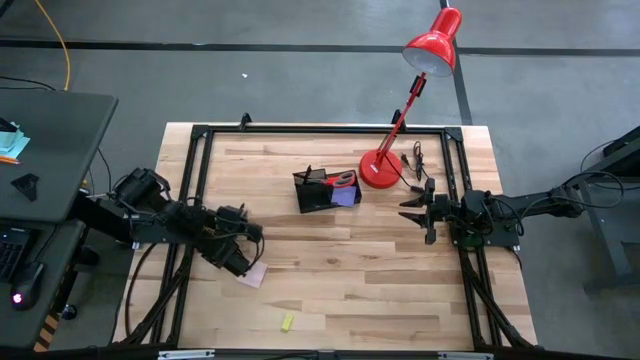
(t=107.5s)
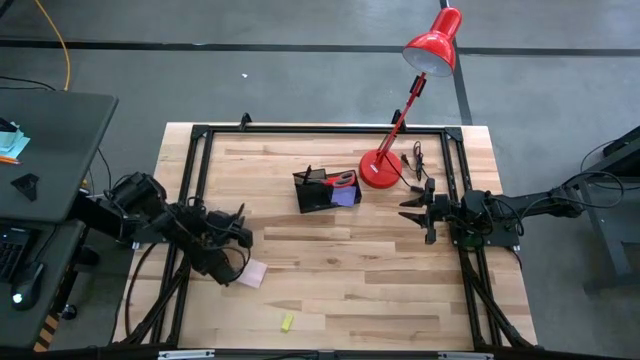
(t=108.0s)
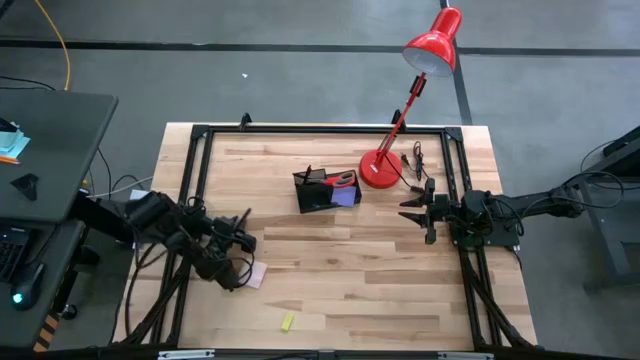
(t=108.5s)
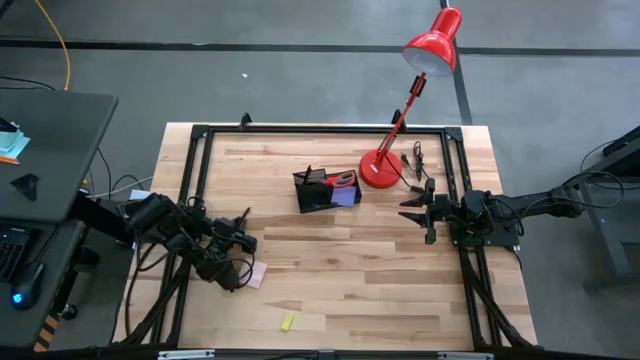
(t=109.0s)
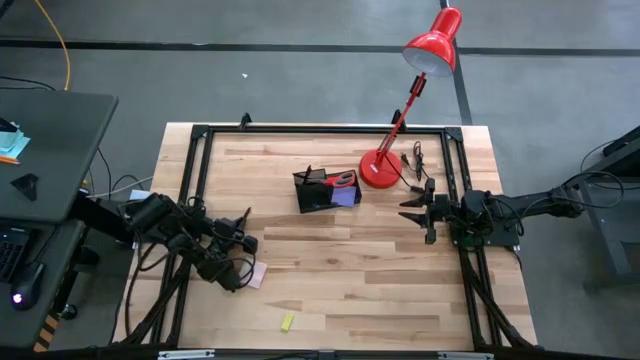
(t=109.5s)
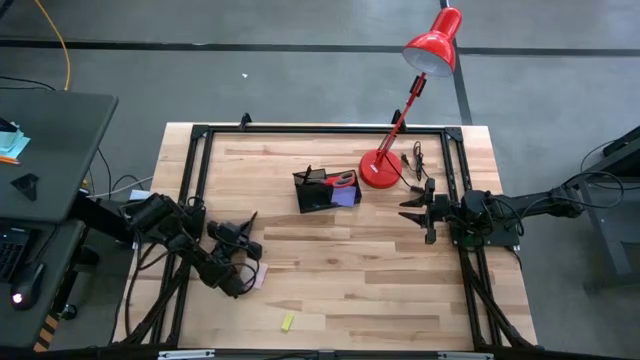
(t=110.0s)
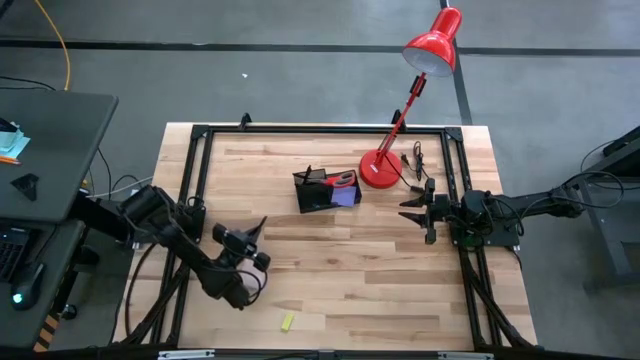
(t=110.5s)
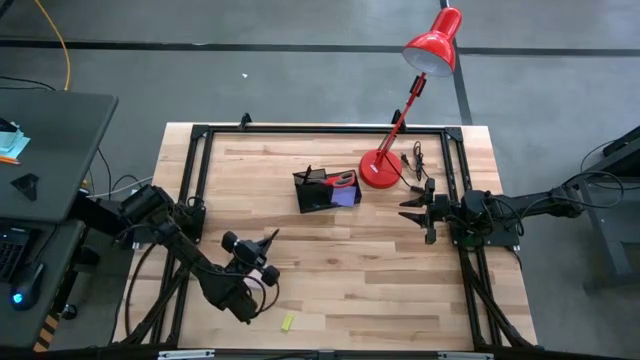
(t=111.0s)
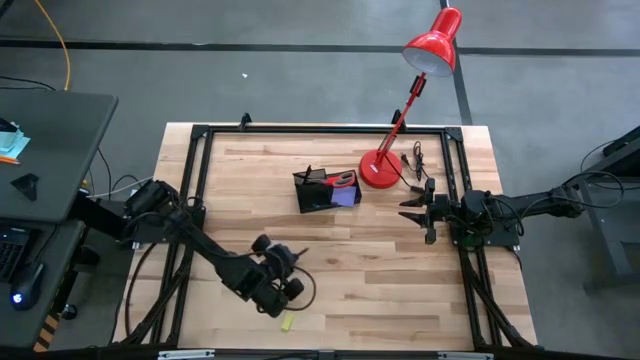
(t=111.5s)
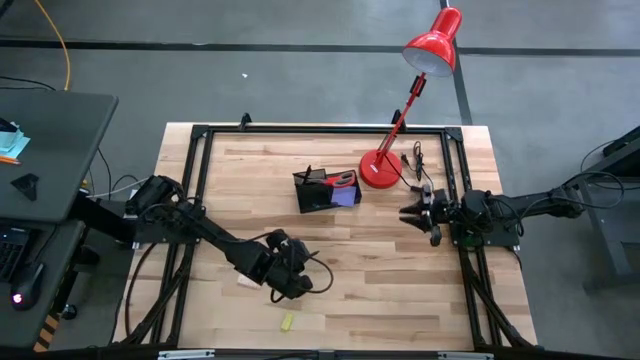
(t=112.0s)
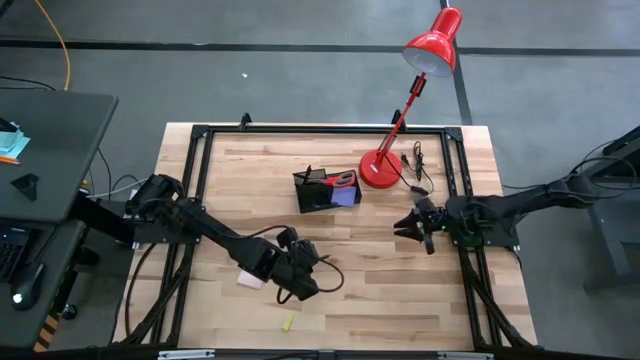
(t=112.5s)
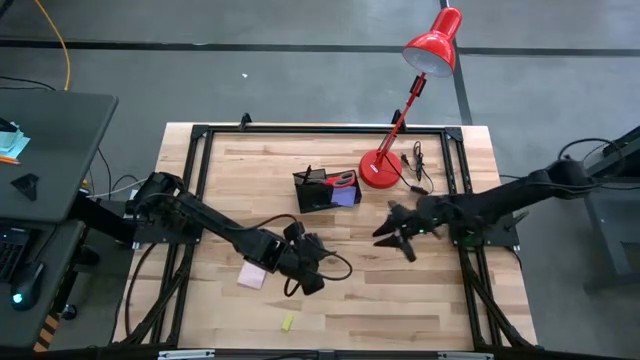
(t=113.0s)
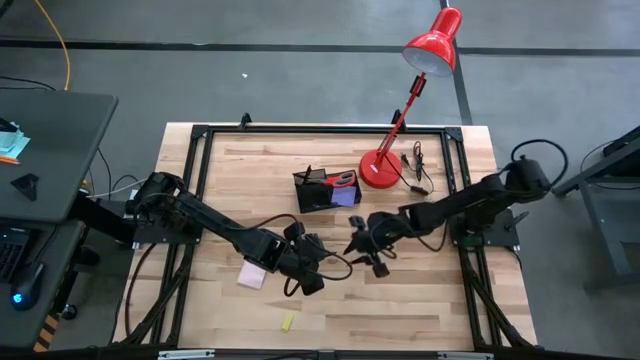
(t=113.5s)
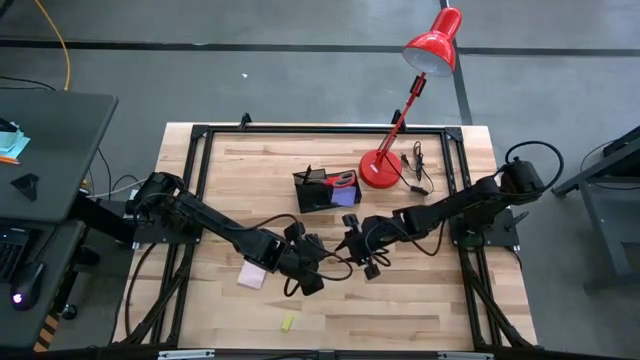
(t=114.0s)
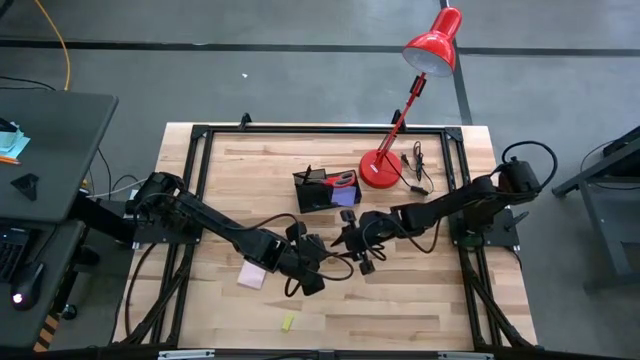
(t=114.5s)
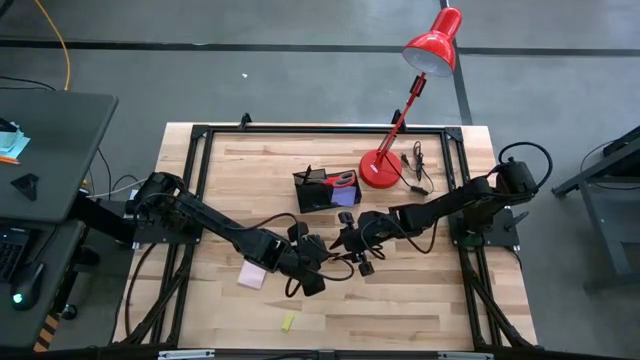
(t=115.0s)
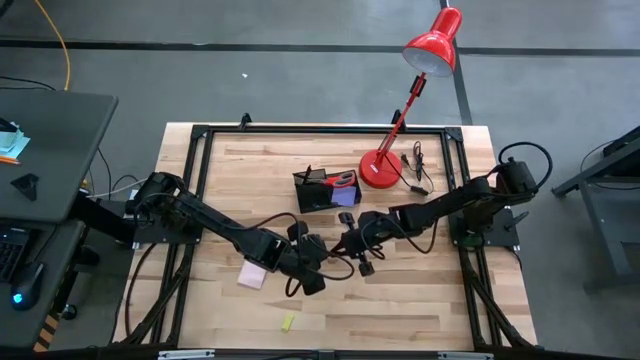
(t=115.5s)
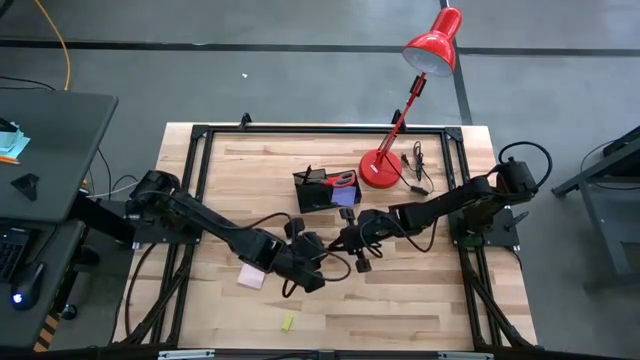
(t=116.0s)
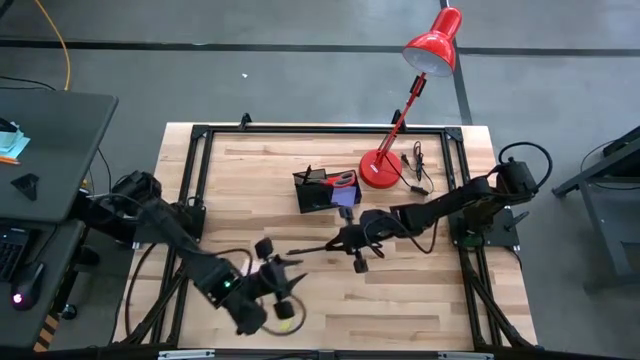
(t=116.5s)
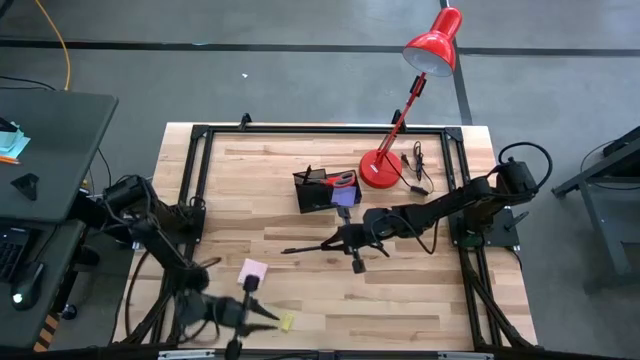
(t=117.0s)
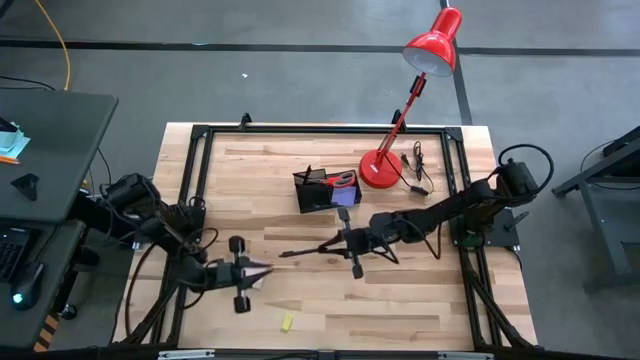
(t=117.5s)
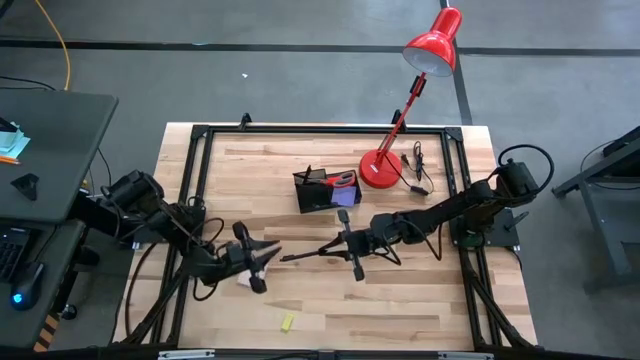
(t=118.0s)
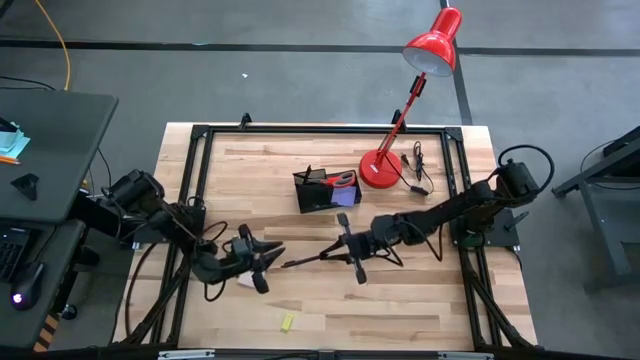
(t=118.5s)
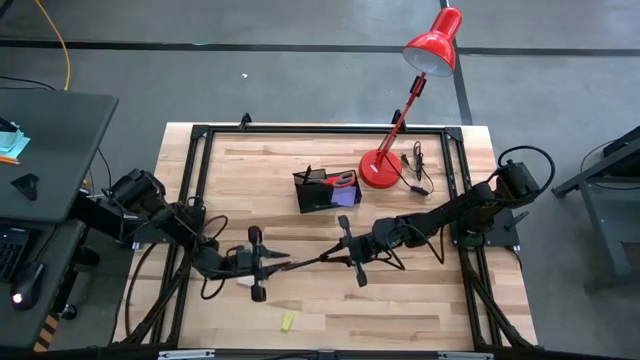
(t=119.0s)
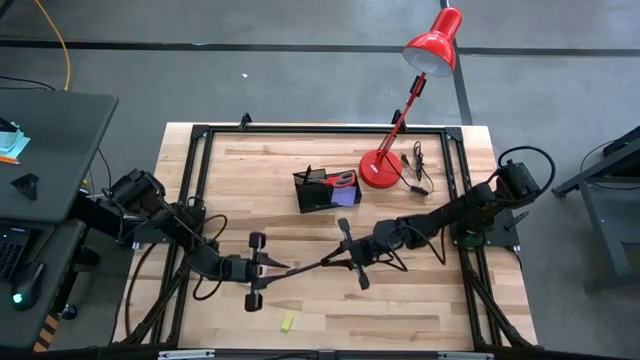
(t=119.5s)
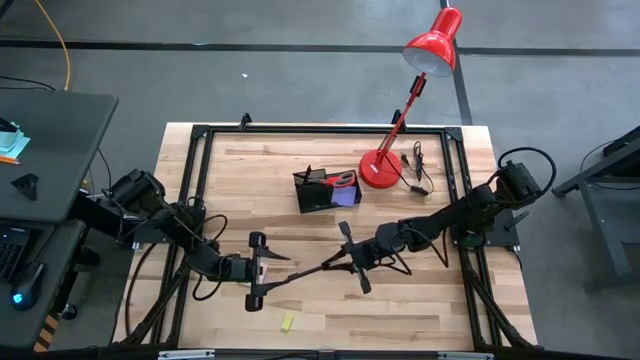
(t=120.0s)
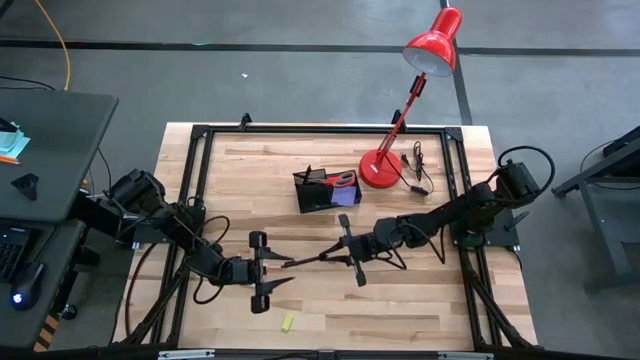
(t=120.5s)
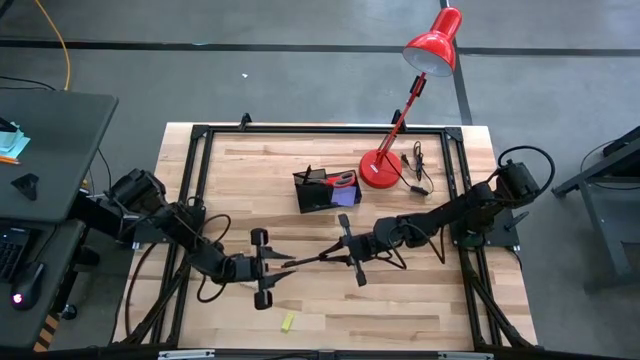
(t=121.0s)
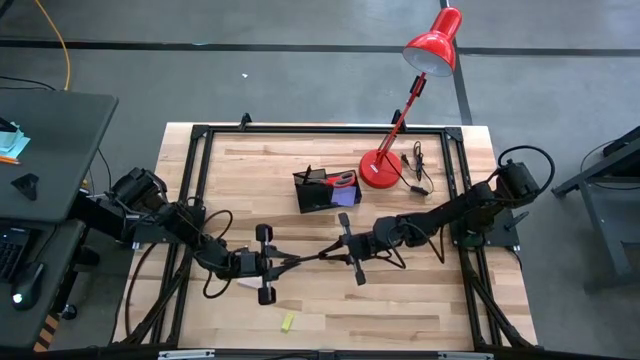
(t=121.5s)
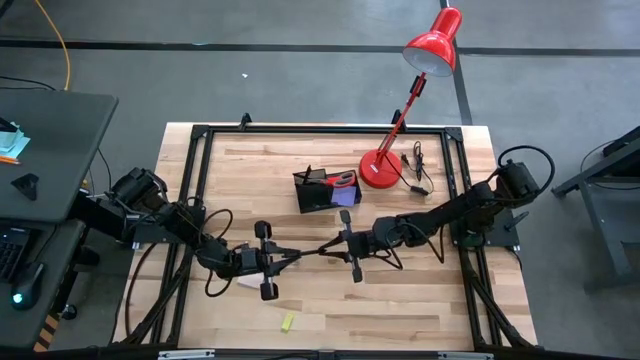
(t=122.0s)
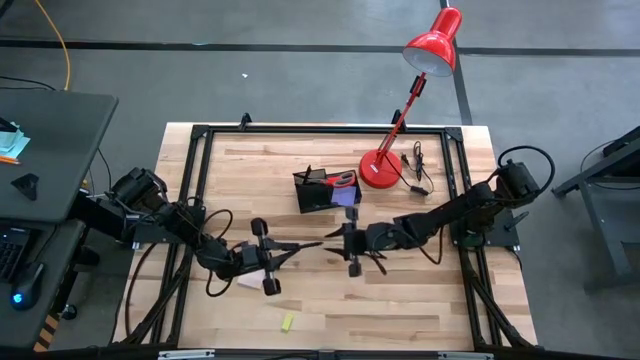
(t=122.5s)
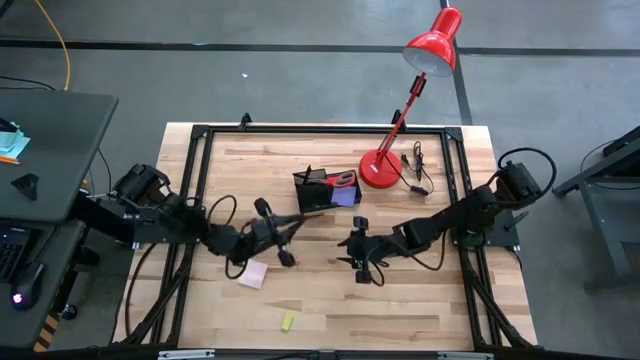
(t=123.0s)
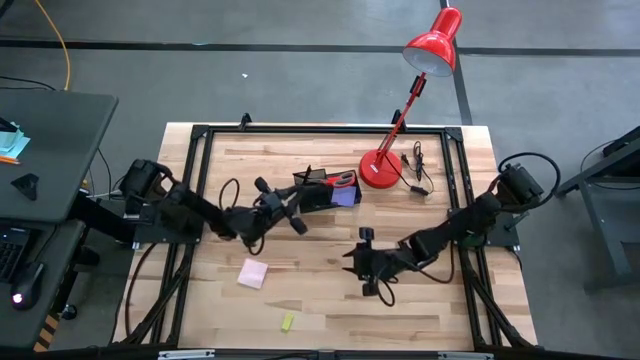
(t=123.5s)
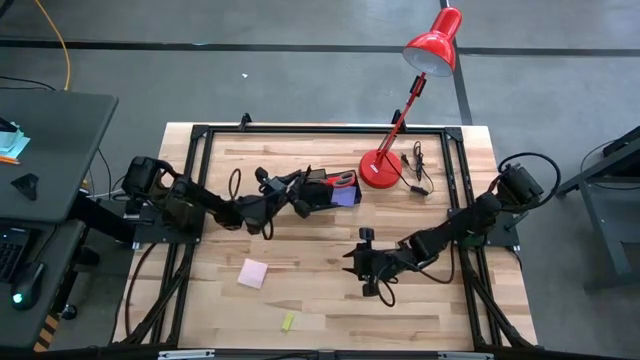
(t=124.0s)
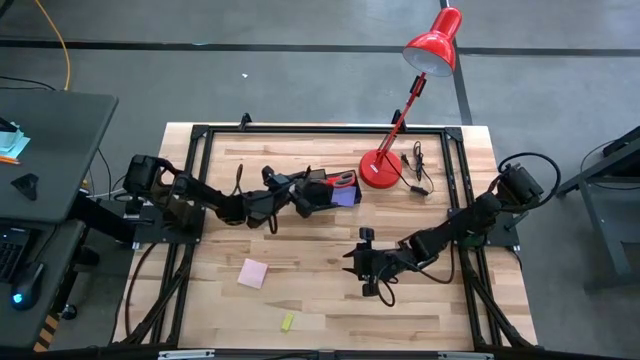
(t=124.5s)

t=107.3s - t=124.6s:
Task: Pick and place office supplies into organizer
Put the black pen into the black desk organizer

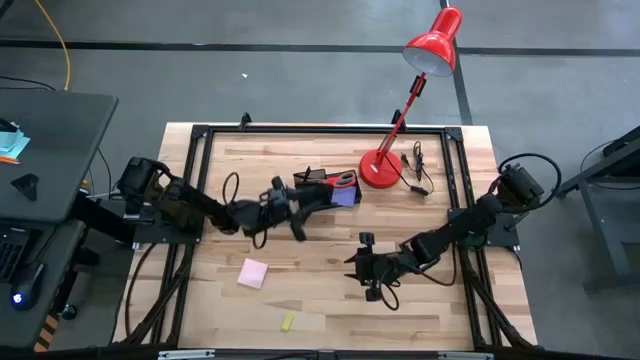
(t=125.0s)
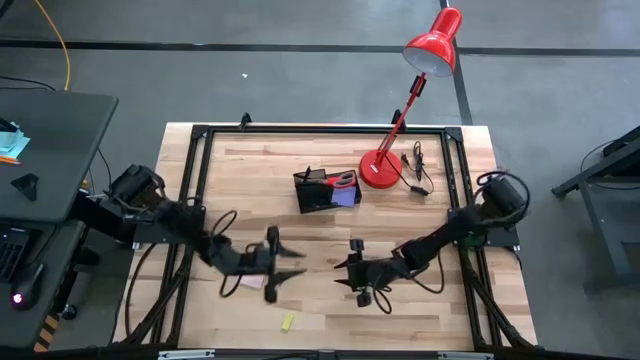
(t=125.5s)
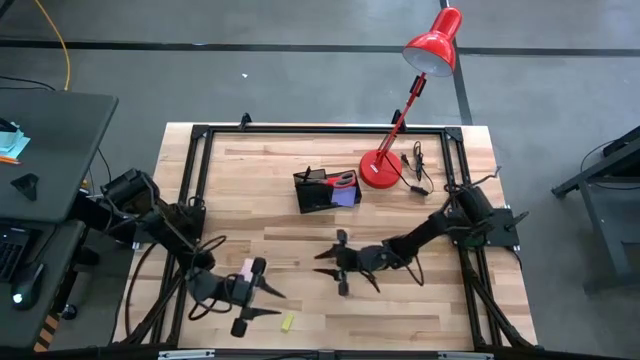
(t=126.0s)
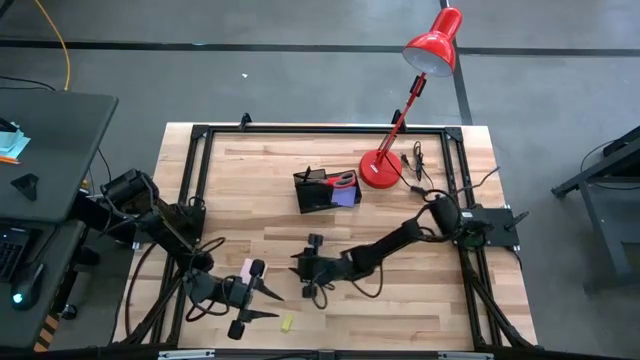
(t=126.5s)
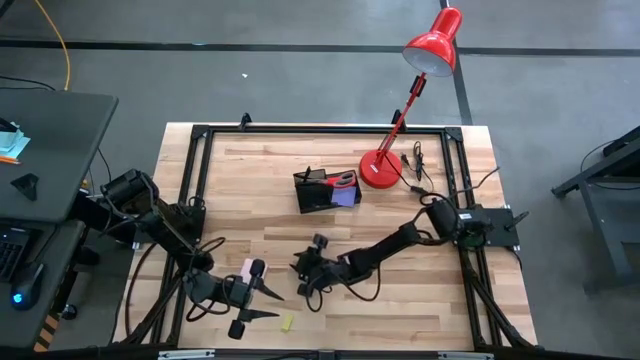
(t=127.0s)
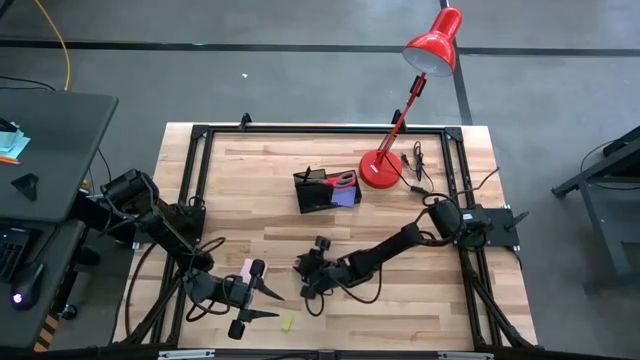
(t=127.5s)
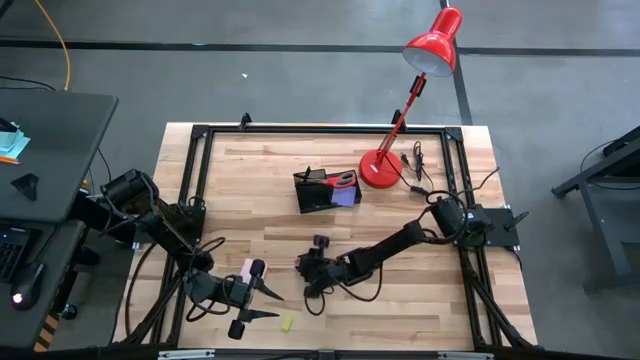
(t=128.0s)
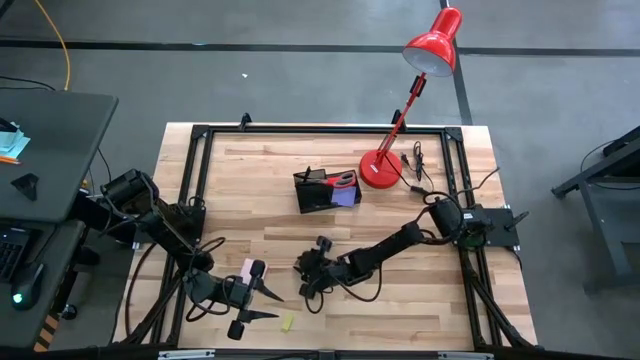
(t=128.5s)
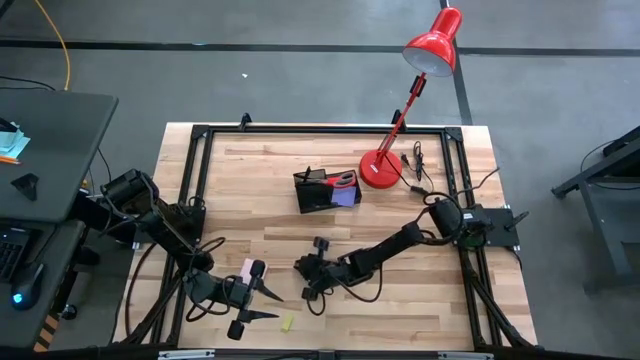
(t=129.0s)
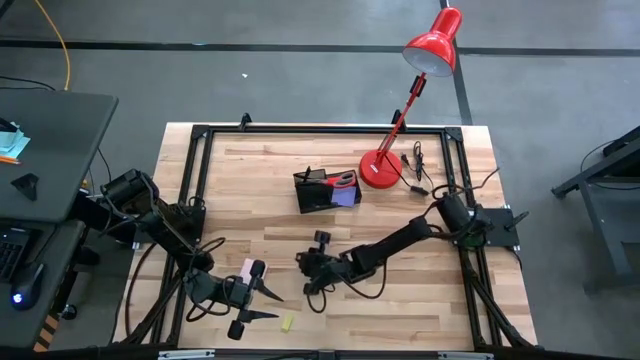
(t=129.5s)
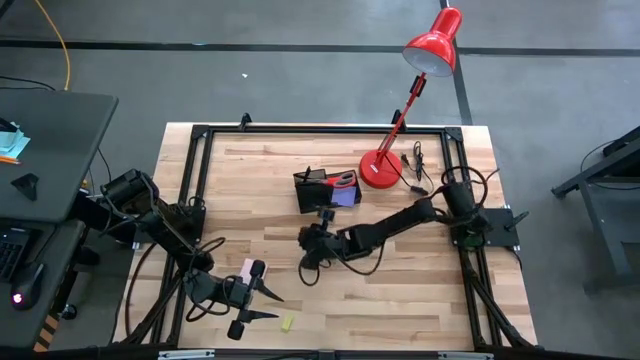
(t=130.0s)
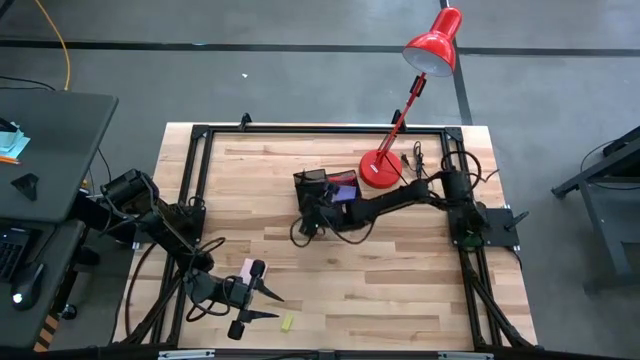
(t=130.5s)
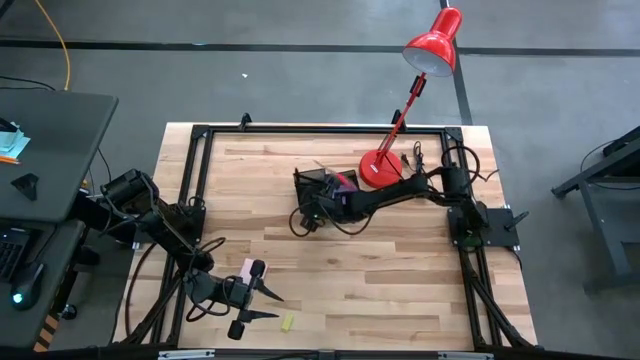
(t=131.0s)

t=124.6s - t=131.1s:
Put the pink binder clip into the desk organizer
